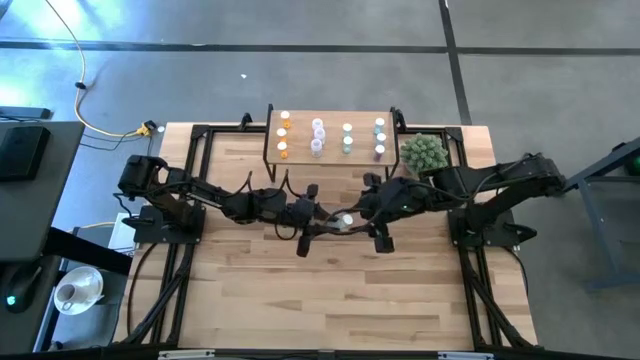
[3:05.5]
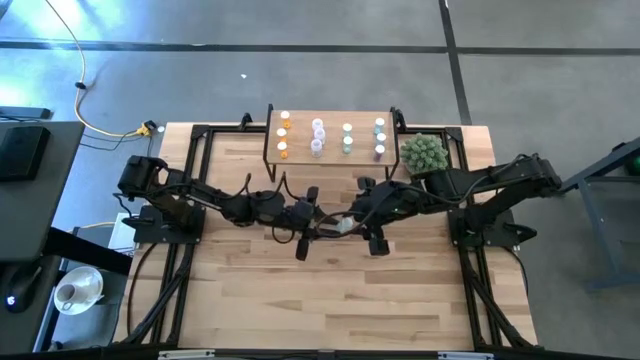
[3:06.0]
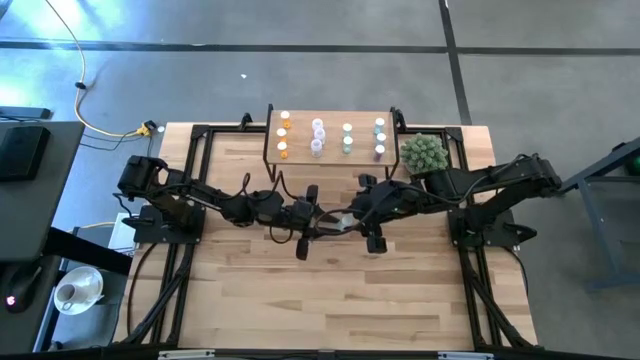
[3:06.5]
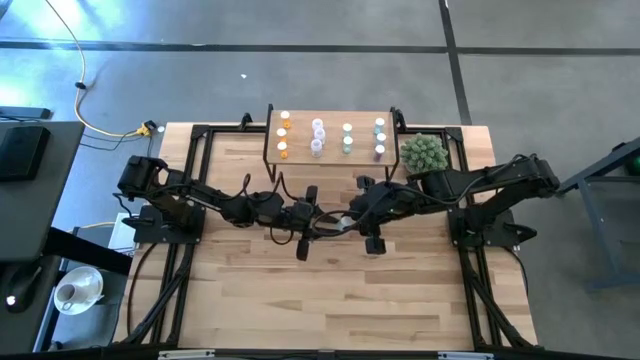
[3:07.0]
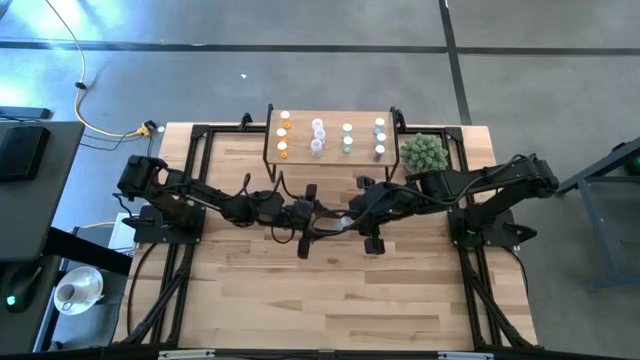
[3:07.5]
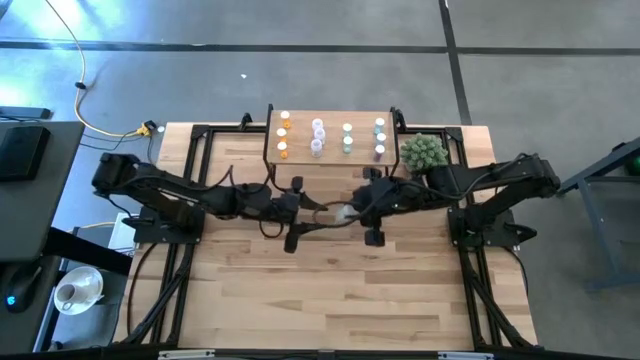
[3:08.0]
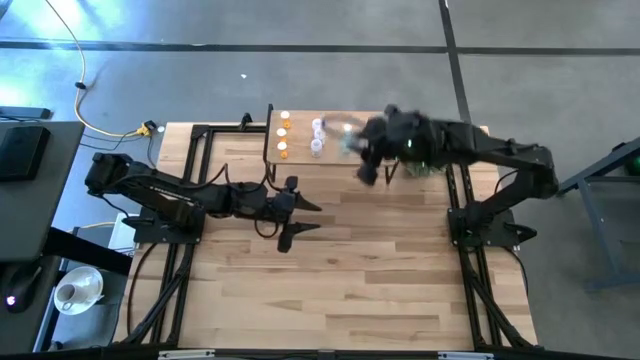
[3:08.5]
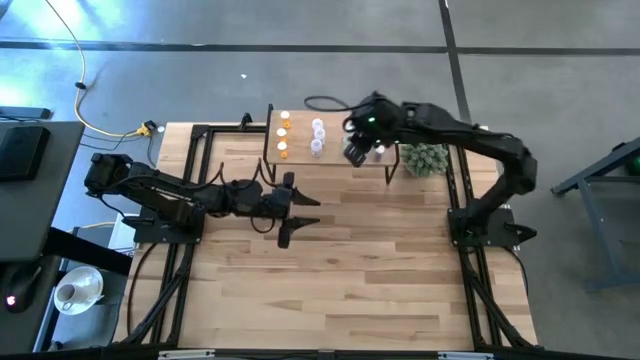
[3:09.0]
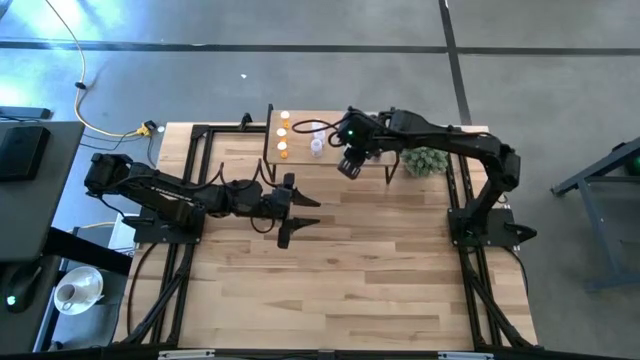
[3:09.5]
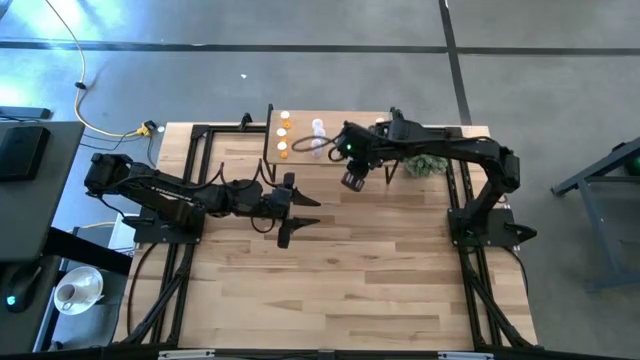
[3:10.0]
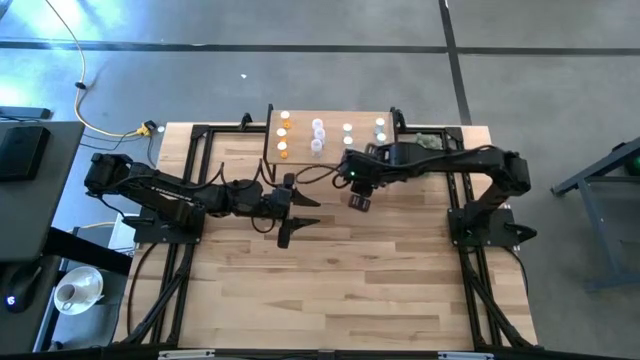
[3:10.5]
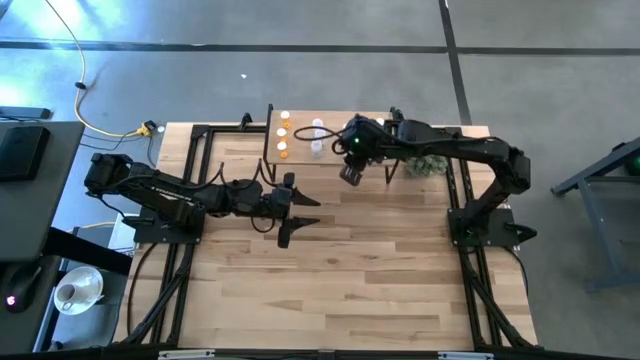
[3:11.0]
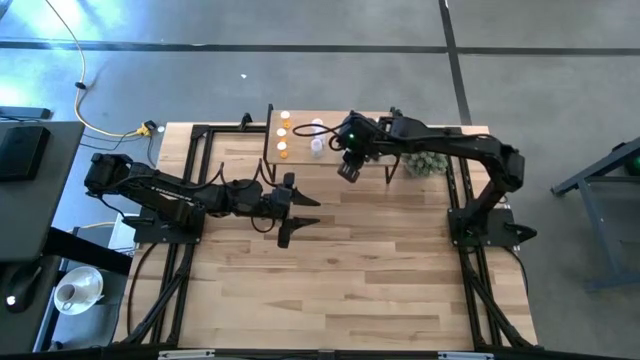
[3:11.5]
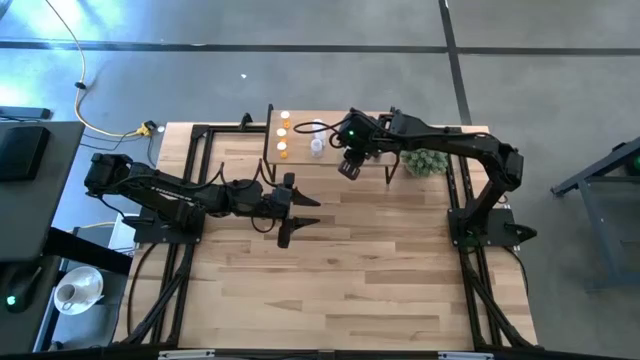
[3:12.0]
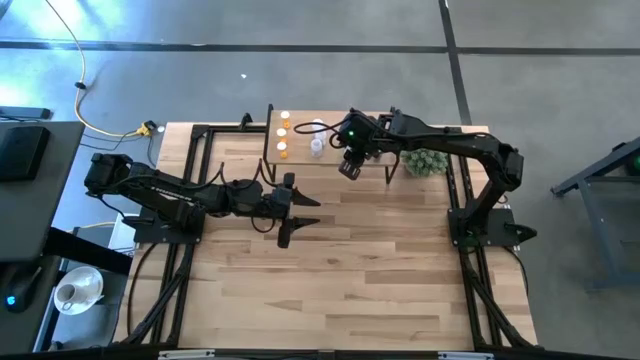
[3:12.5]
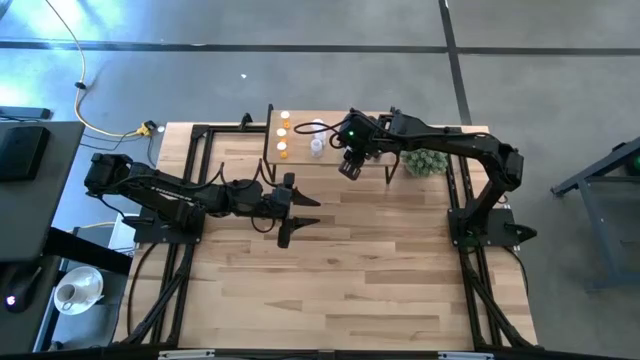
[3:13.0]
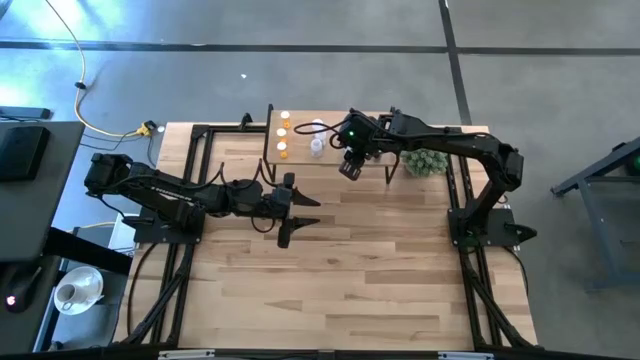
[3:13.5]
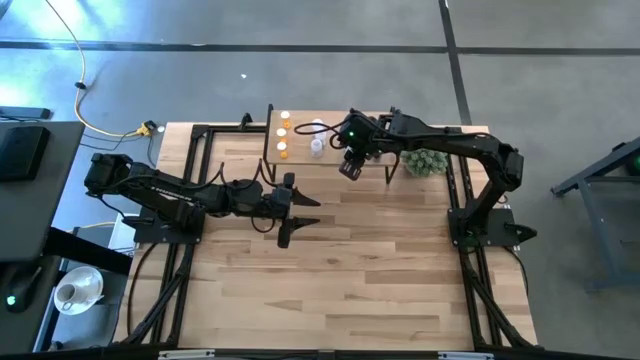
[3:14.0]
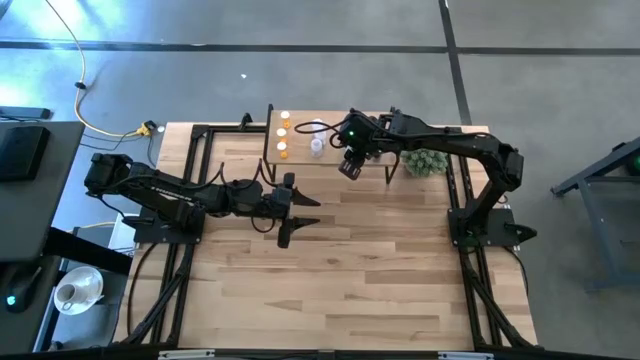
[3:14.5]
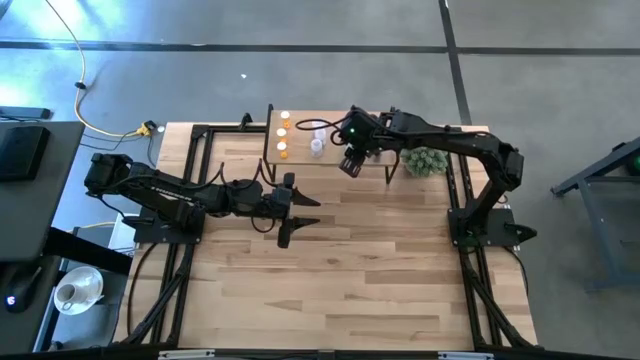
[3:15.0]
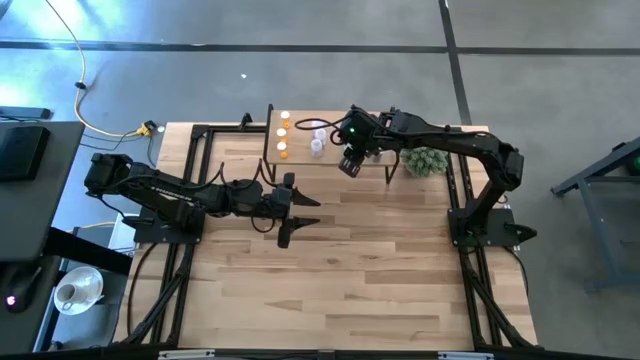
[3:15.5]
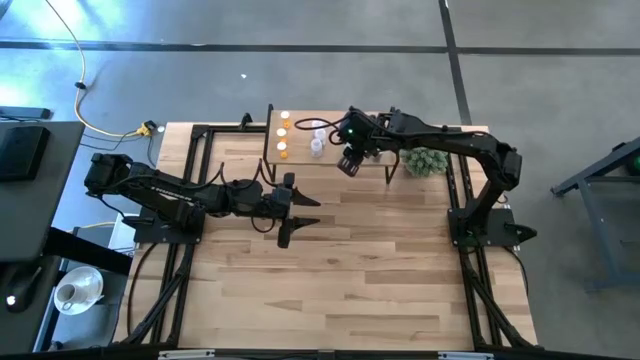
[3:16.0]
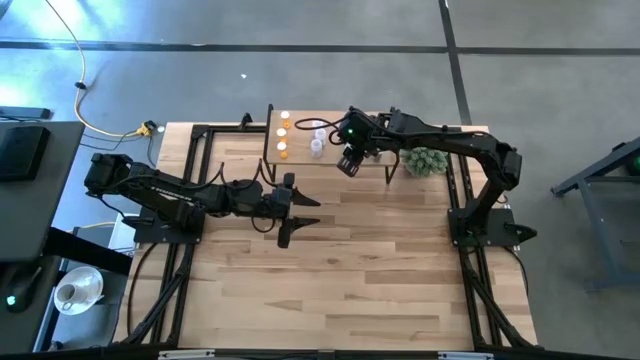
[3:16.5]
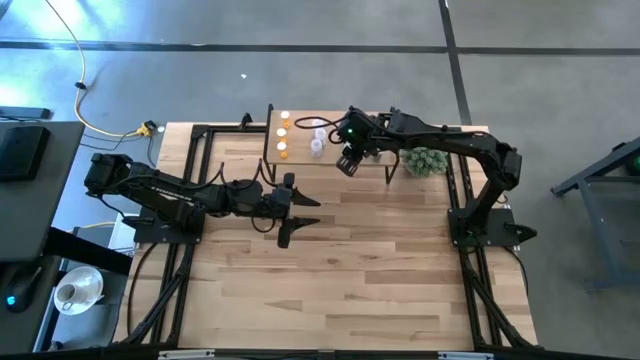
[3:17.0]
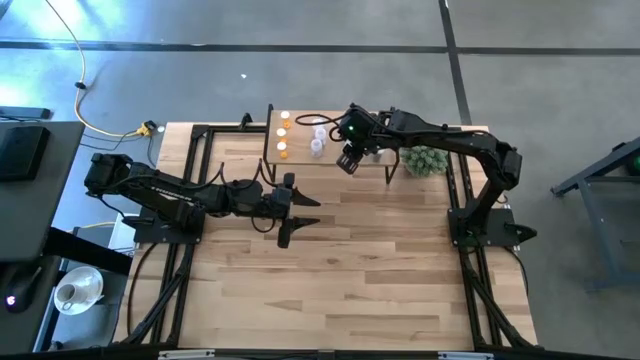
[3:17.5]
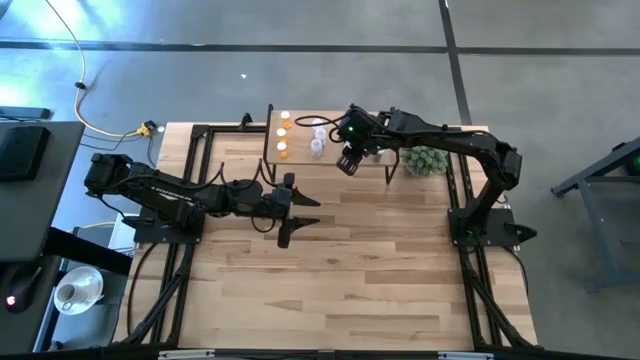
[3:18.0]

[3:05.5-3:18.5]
Task: Pick and place medicine bottles onto shelf by color
Put the green pill bottle on the shelf and aligned with the other green pill bottles

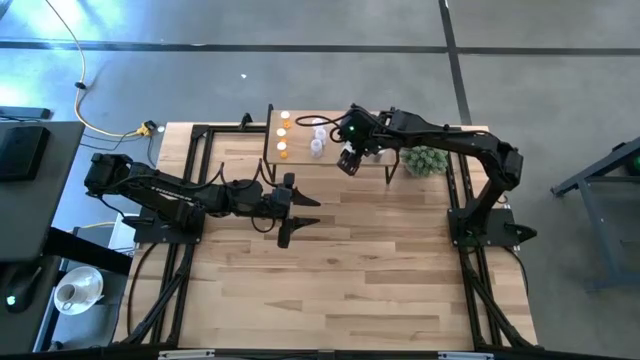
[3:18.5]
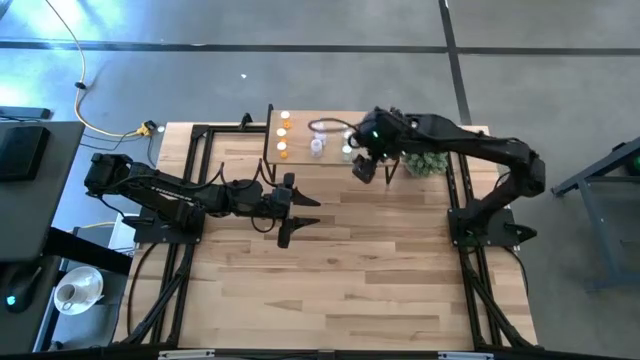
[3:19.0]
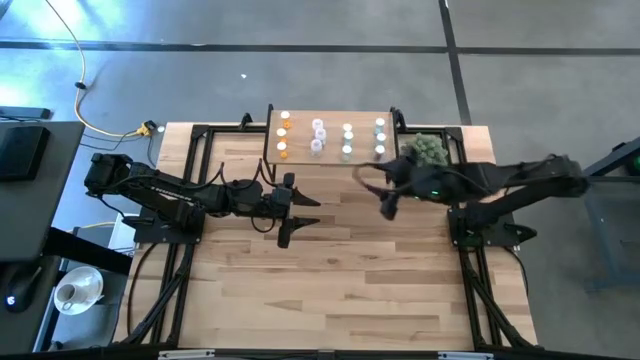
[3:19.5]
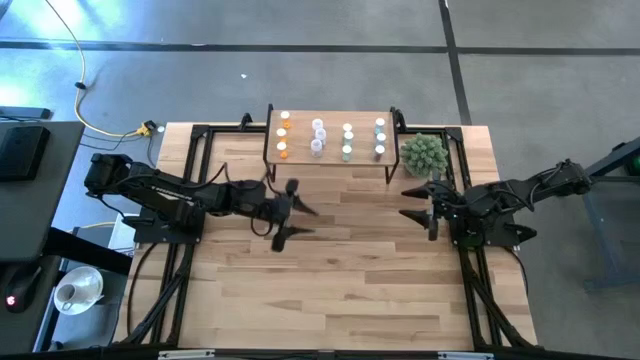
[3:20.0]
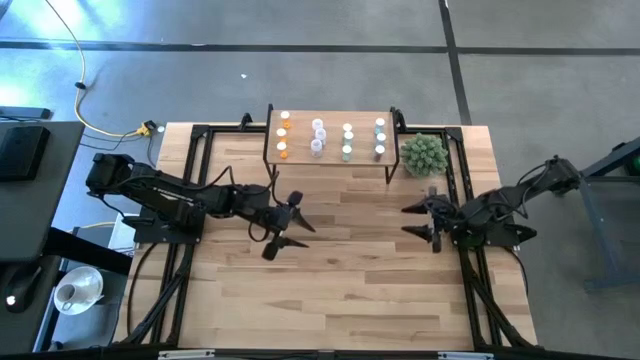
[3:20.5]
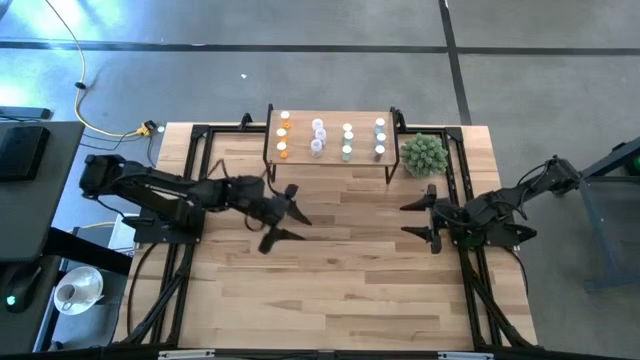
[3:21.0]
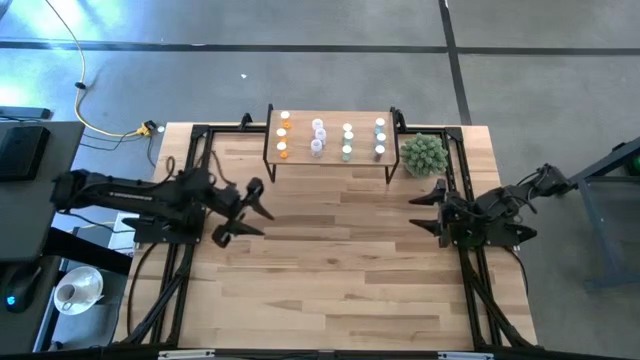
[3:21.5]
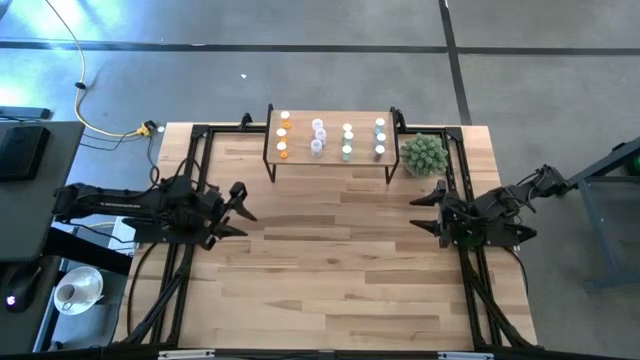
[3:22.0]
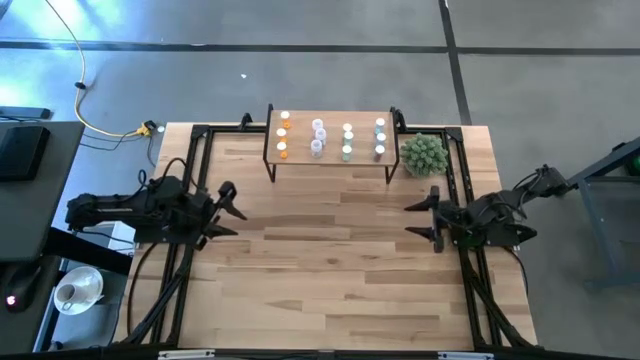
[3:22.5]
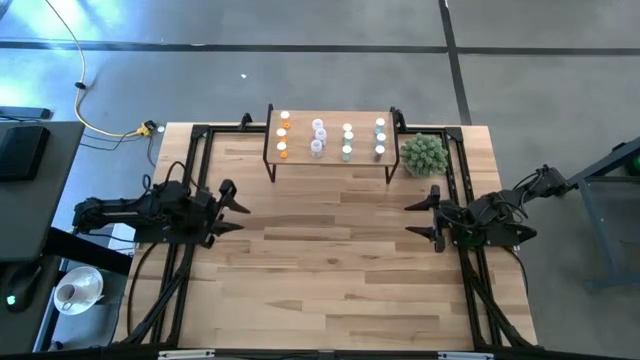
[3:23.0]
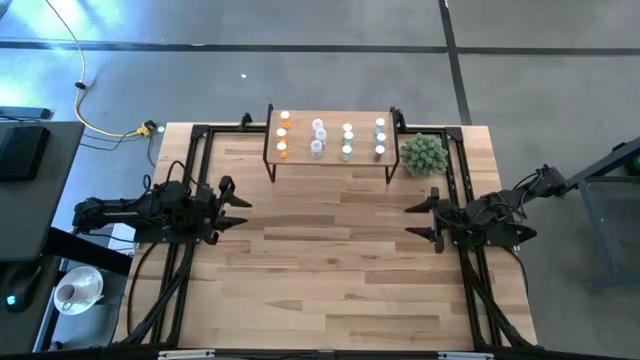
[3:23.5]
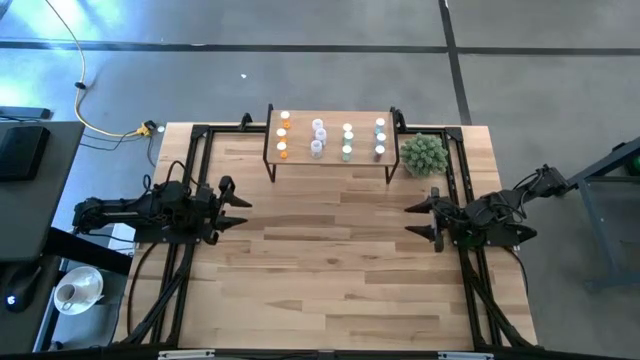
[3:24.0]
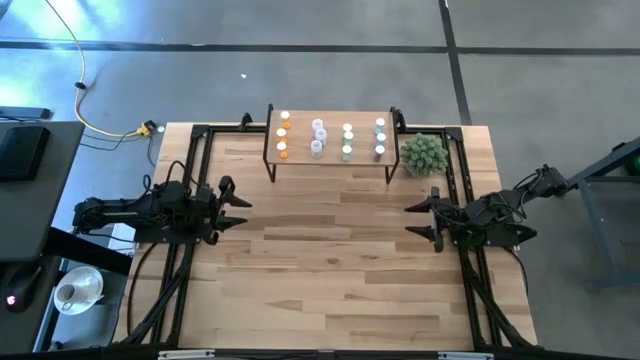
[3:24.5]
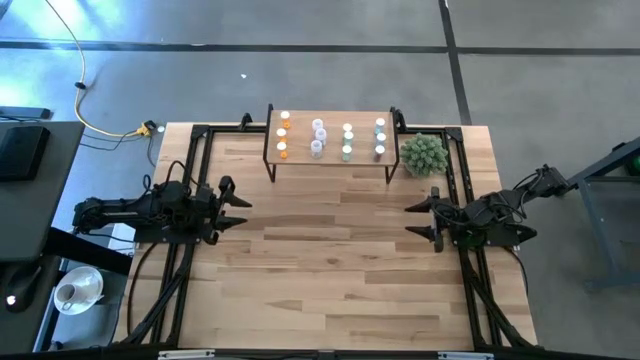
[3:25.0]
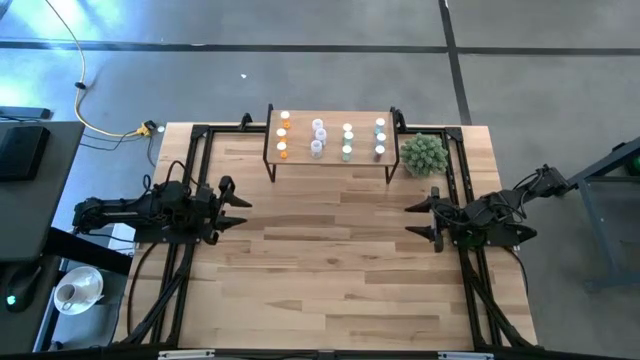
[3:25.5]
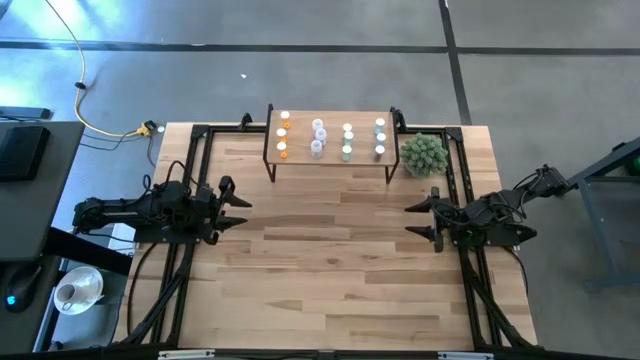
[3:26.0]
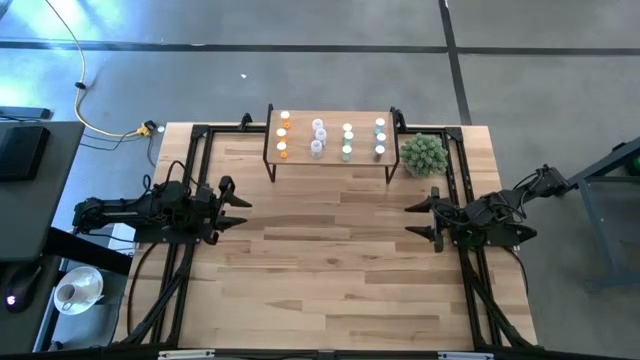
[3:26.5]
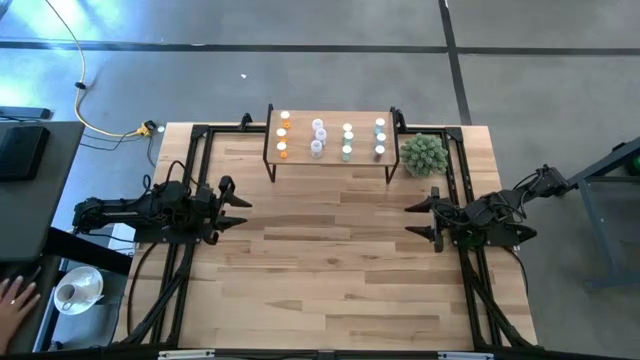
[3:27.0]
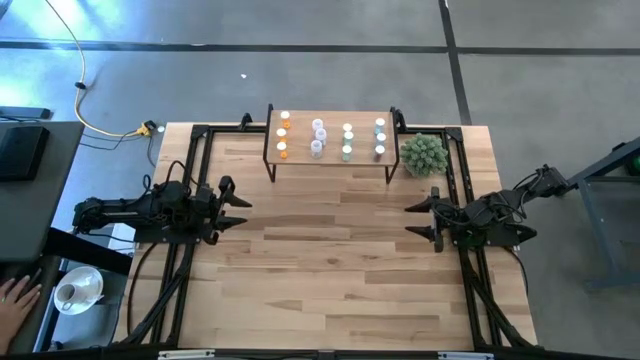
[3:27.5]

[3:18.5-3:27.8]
Return to Home Position
